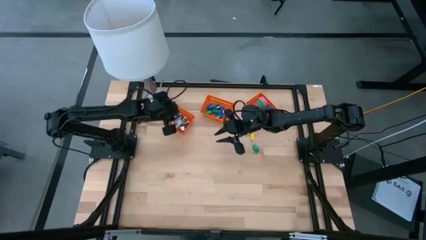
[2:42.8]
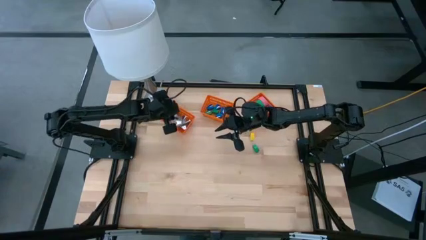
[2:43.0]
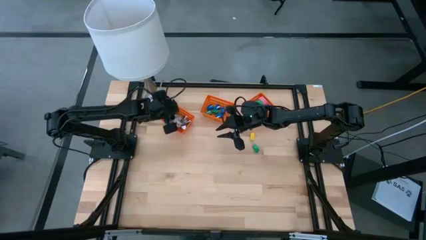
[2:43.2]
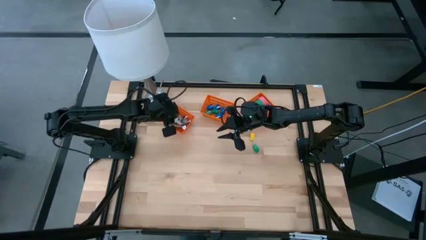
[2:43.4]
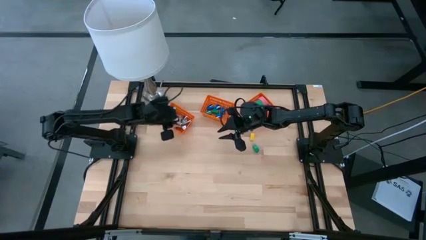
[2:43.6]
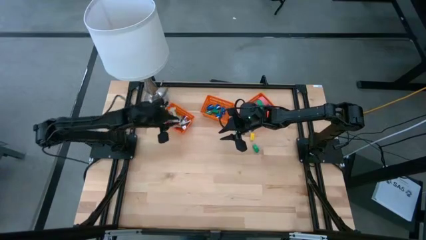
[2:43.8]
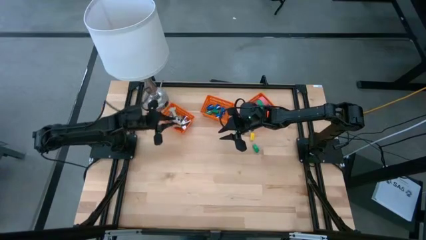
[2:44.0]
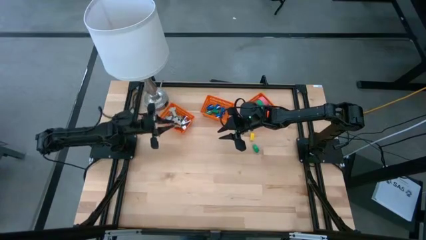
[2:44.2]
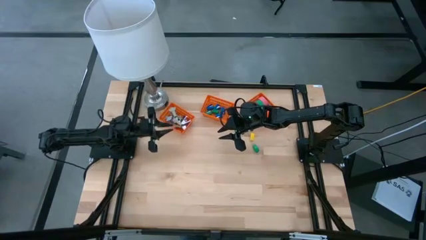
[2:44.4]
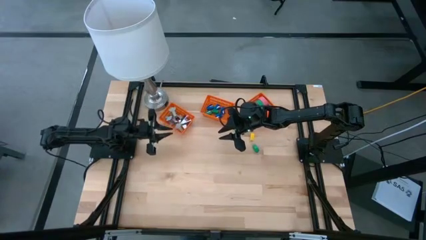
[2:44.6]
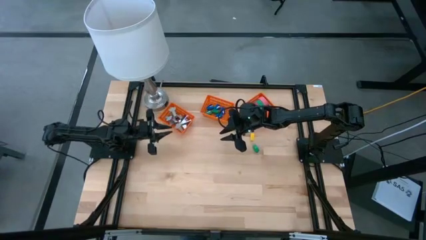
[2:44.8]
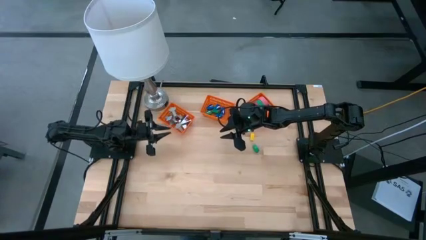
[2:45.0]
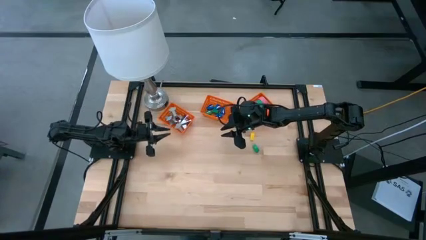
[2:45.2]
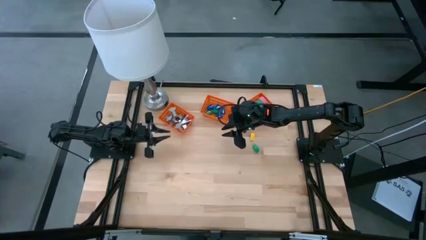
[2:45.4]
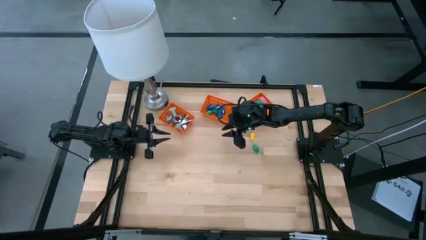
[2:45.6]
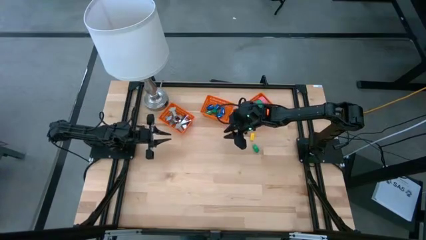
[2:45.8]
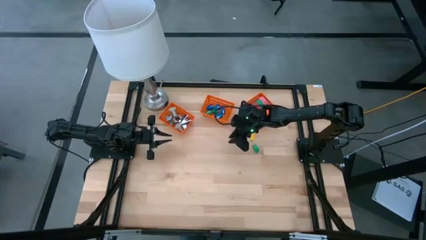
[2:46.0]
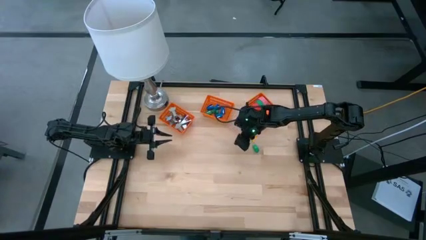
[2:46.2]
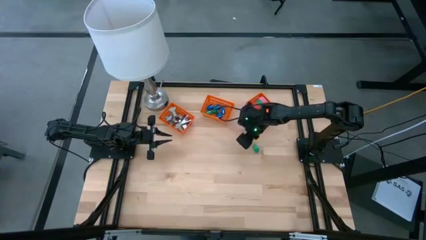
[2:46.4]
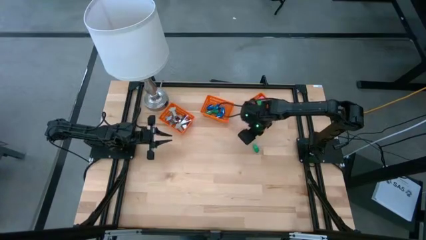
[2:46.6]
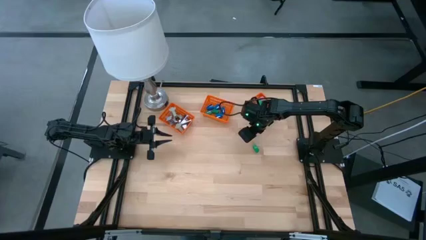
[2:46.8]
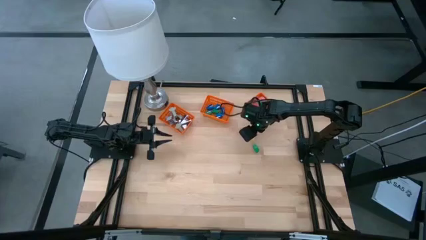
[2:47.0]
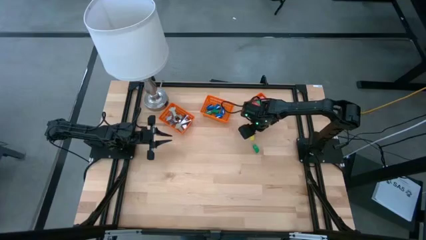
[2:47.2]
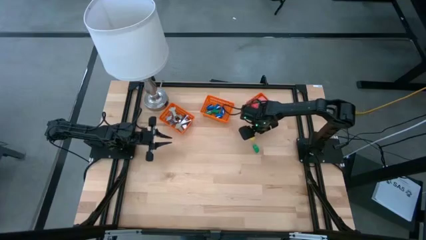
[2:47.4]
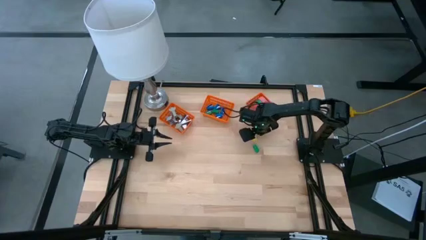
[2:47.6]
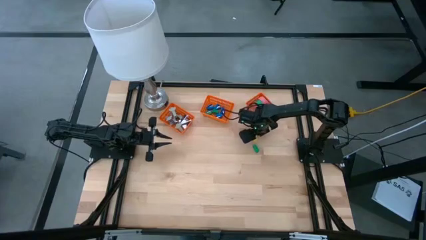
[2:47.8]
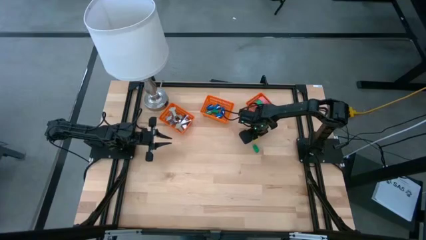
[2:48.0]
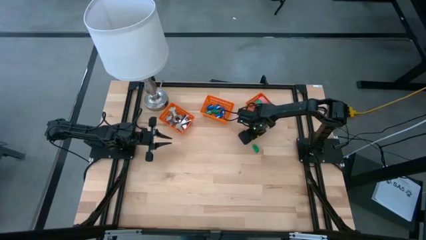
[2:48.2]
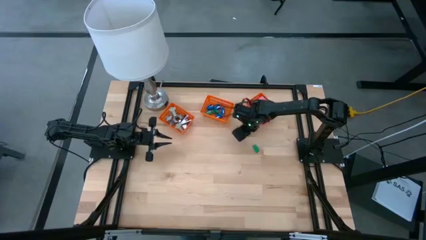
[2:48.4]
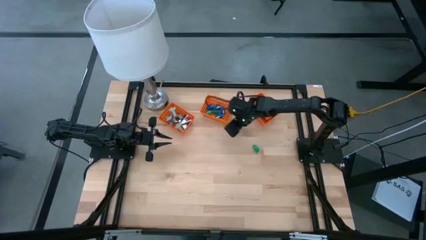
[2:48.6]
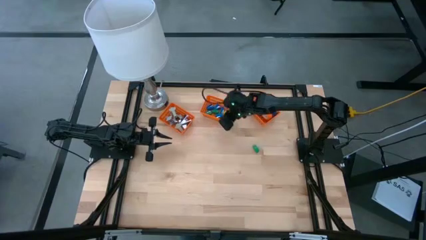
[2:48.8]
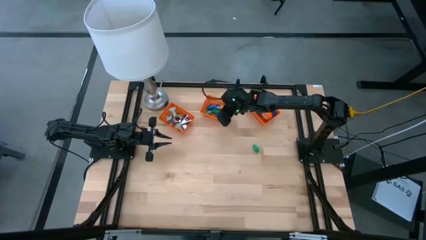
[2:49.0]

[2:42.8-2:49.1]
Task: Pick and place Stapler, Stapler remover, tape
Put the yellow stapler into the middle orange bin

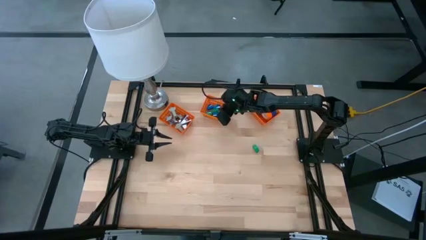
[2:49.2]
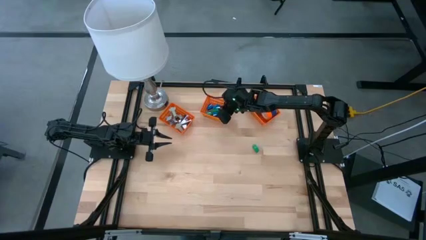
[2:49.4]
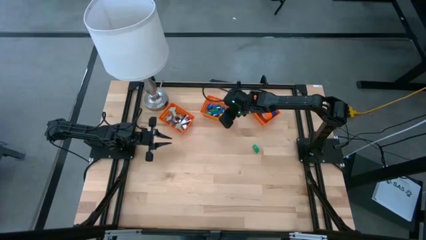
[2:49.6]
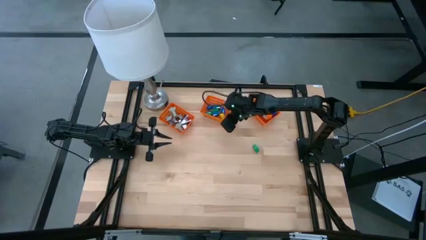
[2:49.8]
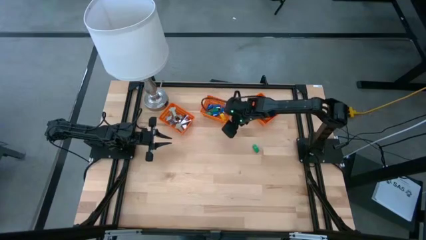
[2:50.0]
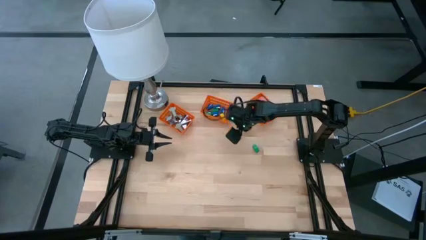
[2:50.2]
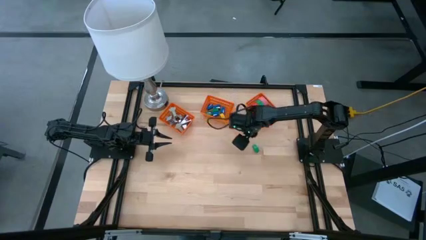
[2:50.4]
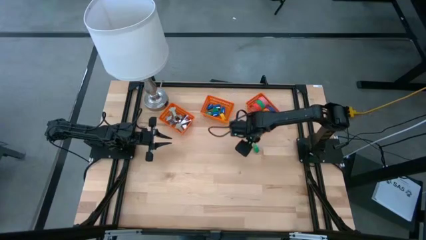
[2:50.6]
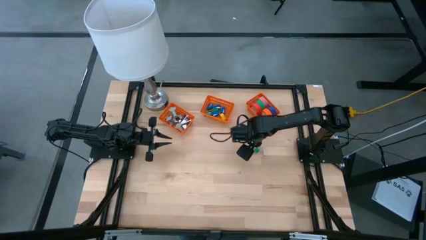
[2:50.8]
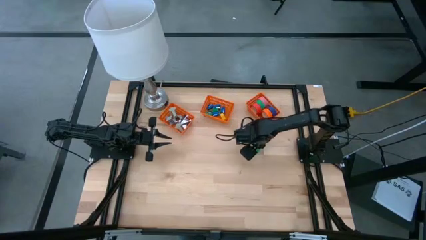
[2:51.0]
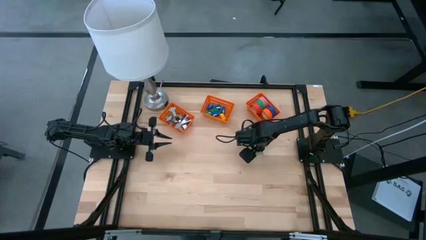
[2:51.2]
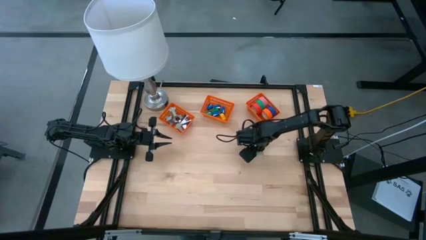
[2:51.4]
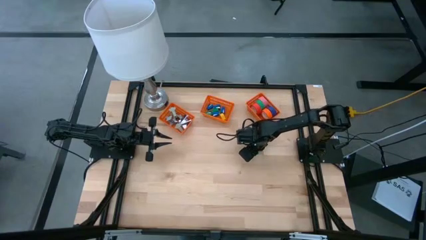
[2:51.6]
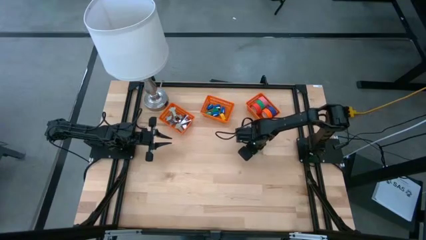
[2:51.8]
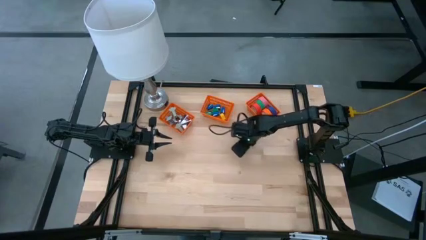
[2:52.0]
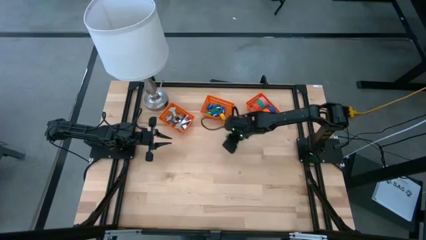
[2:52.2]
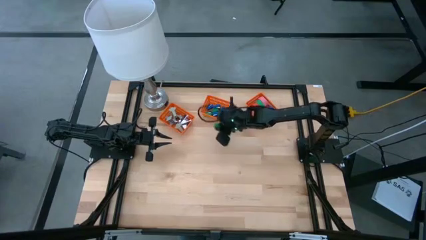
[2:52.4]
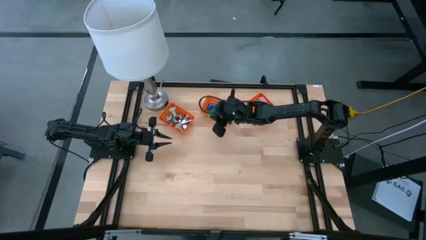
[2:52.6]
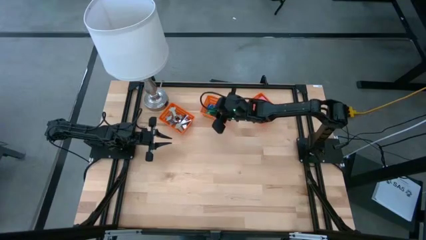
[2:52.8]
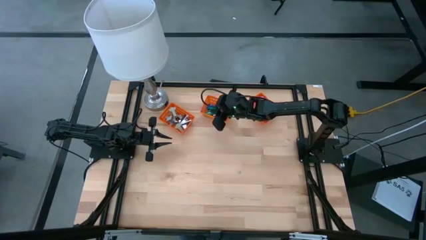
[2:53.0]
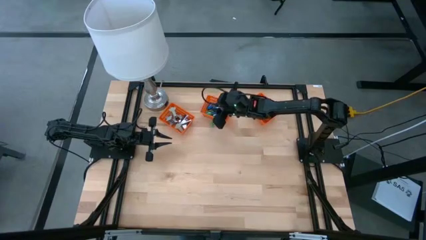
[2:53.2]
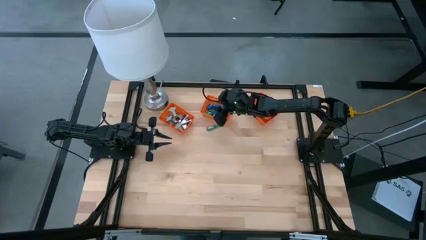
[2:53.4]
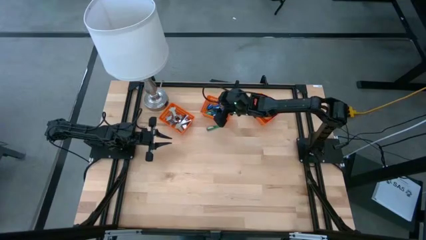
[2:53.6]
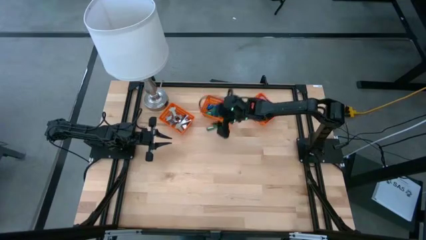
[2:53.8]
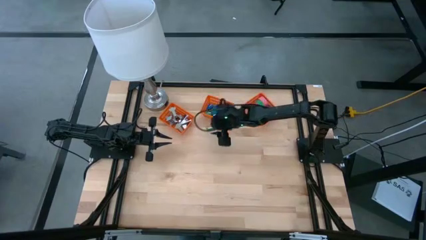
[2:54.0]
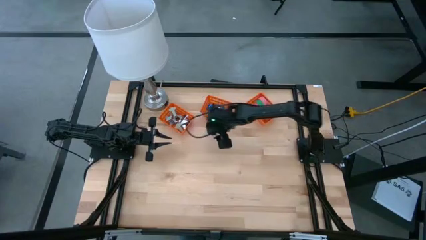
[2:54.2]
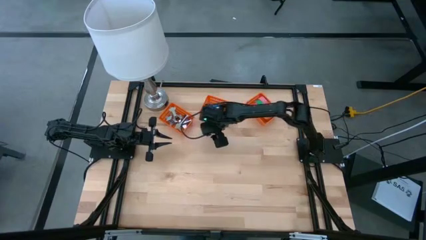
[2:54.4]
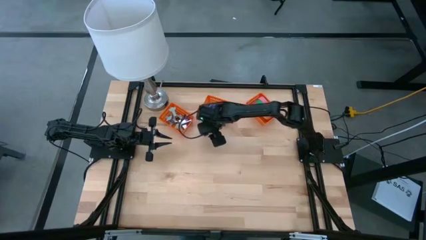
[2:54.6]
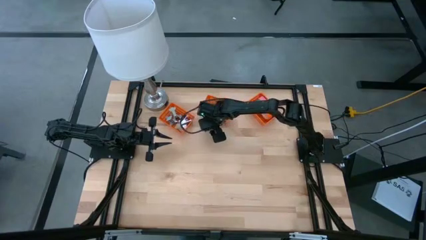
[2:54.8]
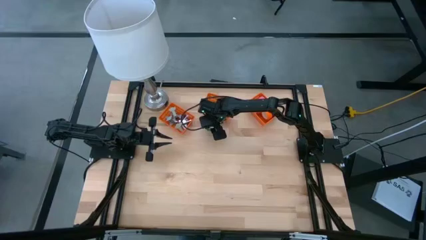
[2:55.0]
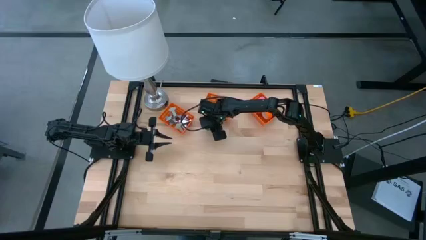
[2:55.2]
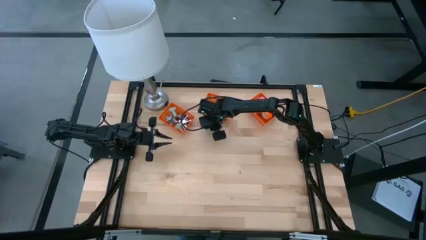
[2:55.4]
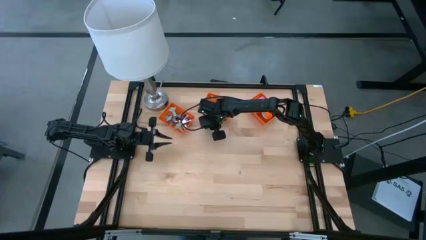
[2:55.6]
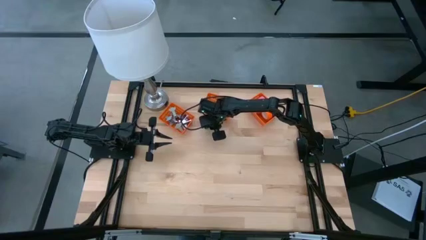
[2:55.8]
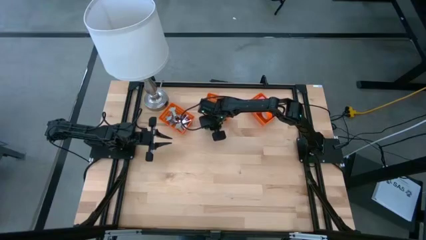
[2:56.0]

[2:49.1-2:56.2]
Put the green stapler into the middle orange bin

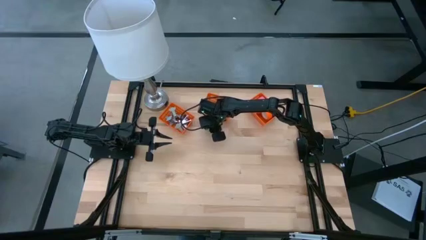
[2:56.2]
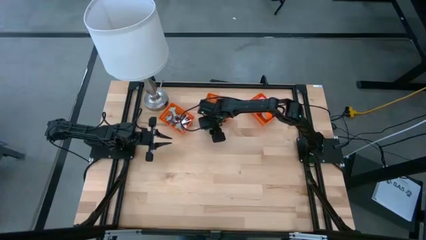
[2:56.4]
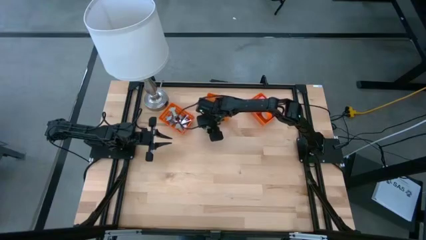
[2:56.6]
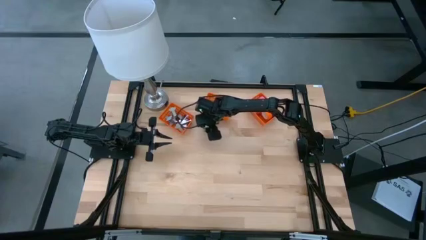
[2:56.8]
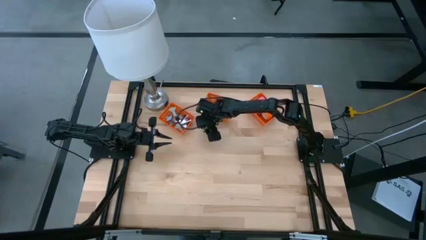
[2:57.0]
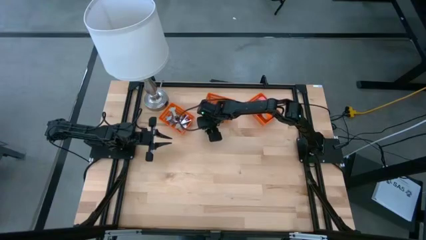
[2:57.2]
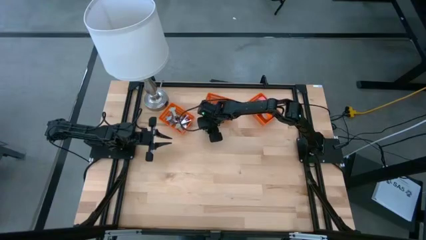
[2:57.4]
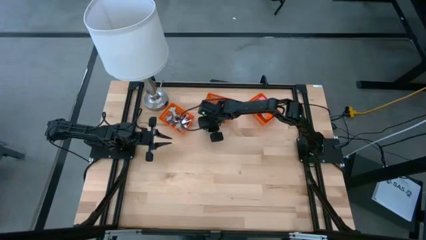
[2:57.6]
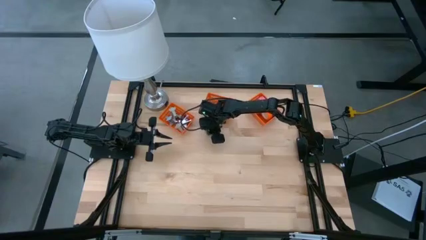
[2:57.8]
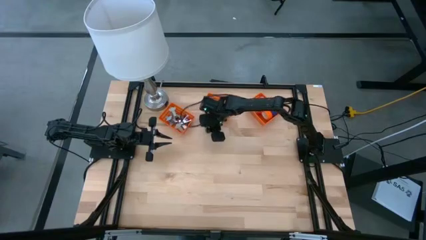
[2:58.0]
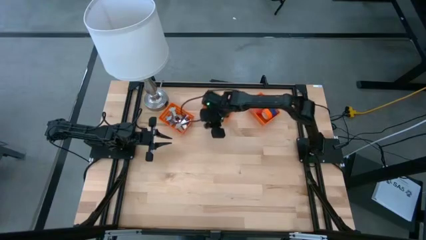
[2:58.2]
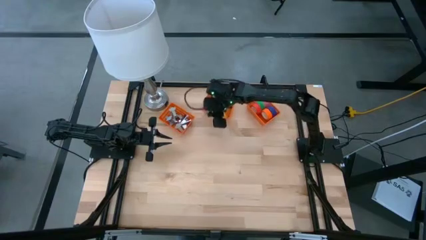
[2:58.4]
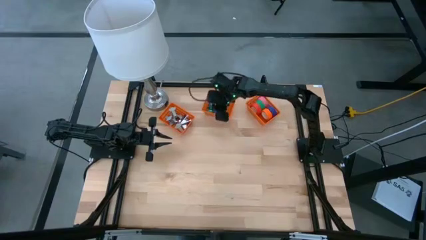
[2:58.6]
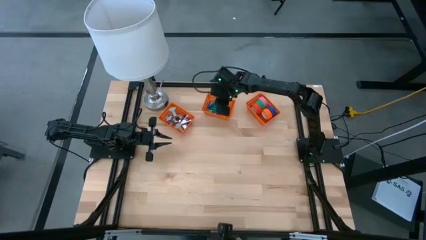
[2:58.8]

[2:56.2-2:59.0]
Put the green stapler into the middle orange bin
